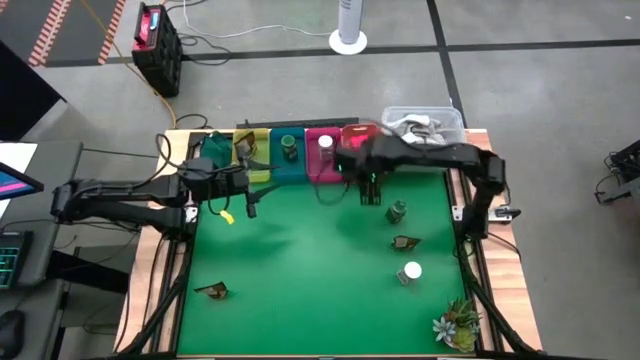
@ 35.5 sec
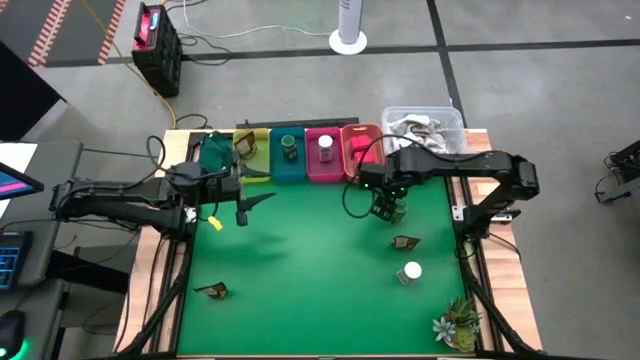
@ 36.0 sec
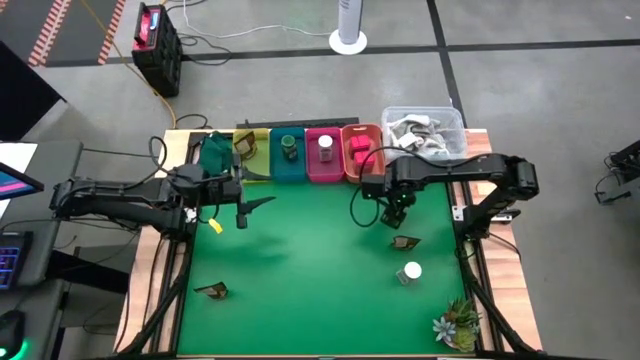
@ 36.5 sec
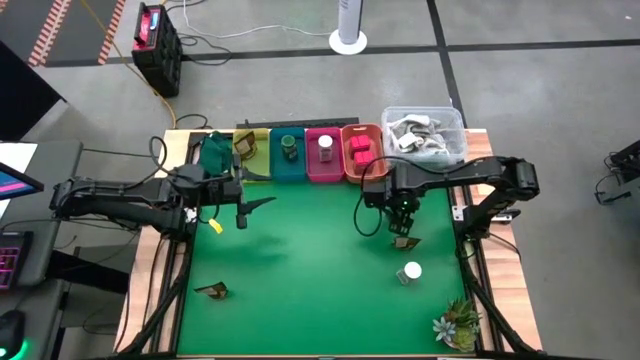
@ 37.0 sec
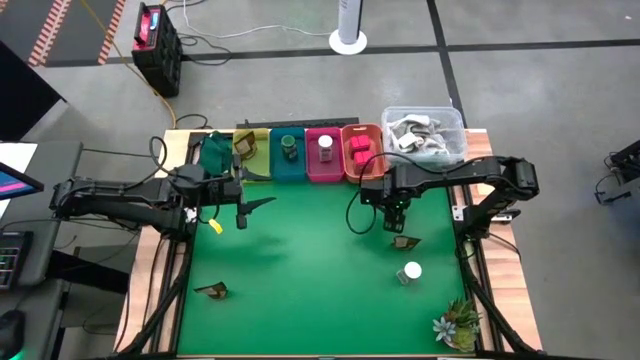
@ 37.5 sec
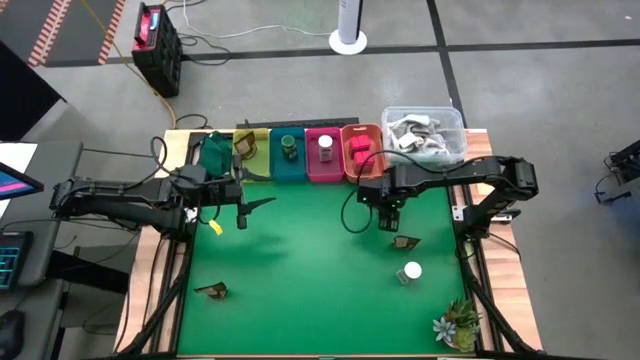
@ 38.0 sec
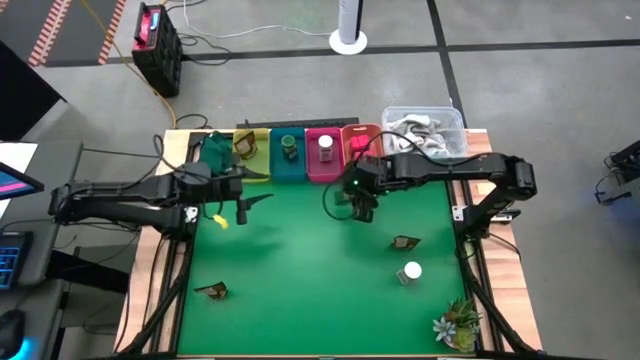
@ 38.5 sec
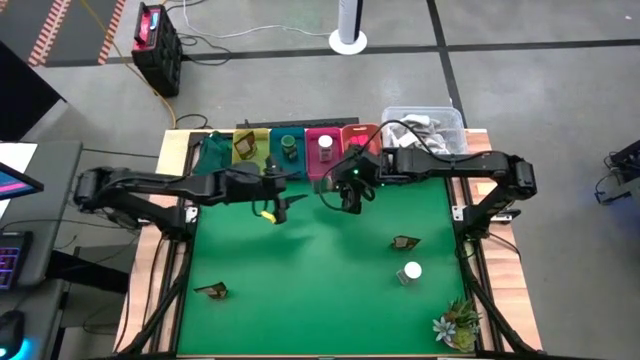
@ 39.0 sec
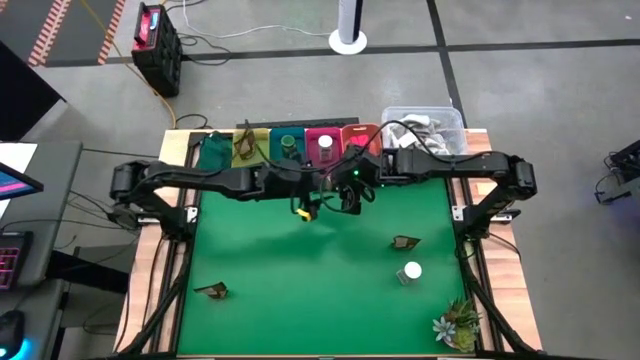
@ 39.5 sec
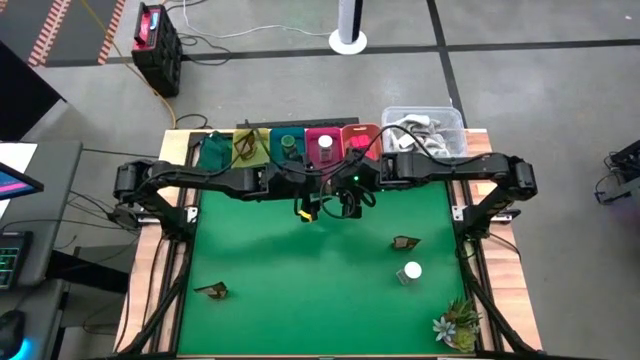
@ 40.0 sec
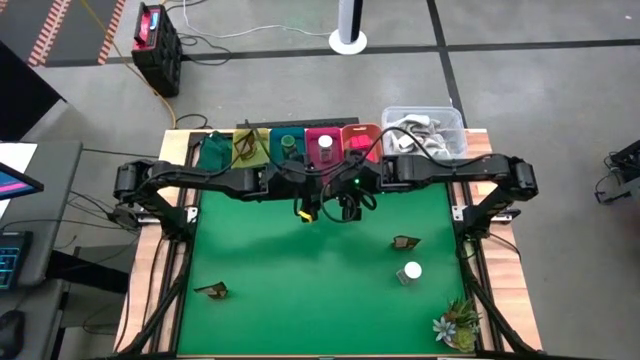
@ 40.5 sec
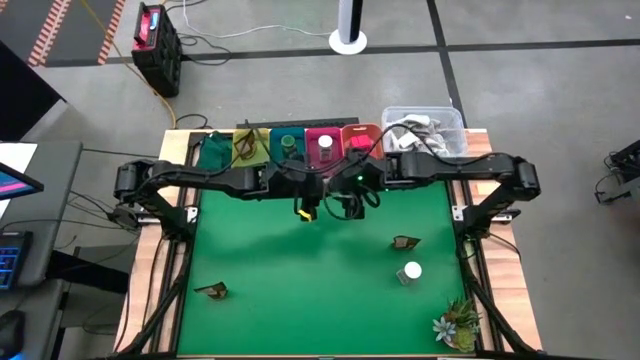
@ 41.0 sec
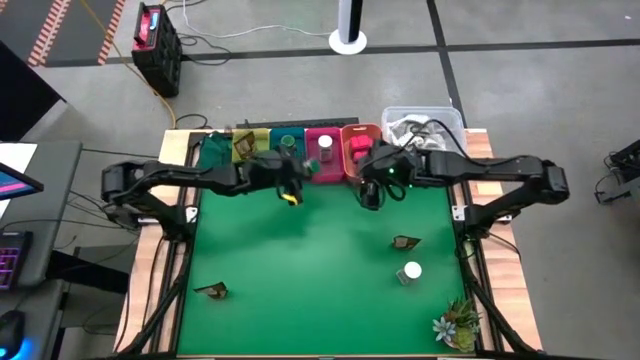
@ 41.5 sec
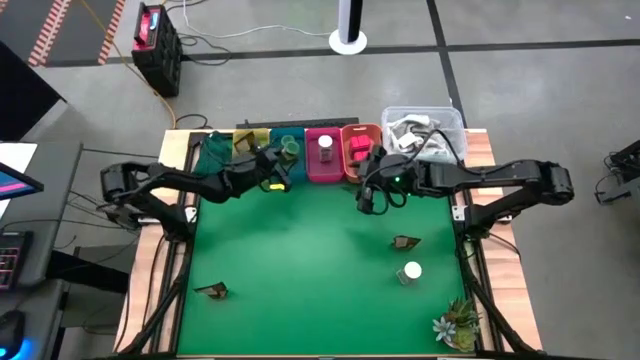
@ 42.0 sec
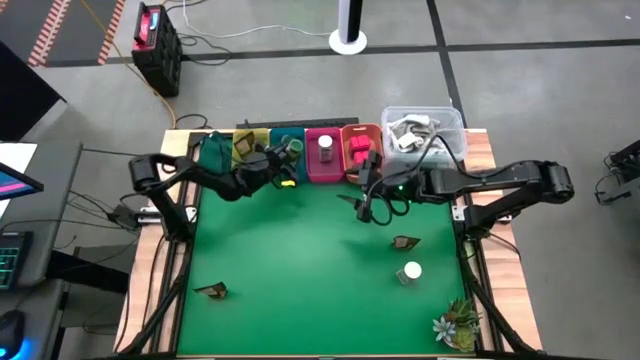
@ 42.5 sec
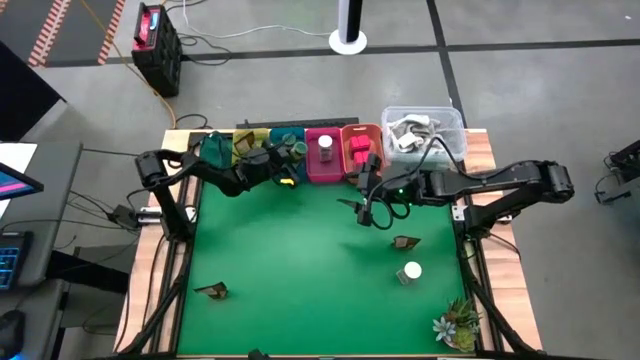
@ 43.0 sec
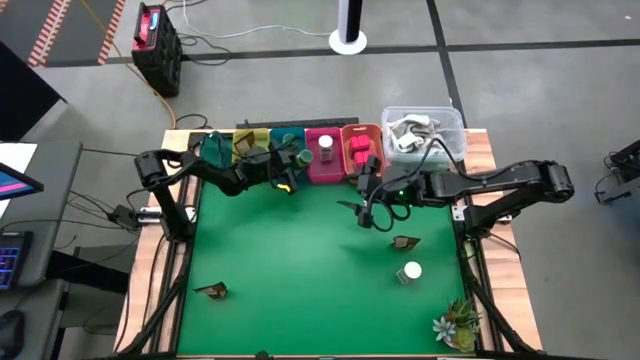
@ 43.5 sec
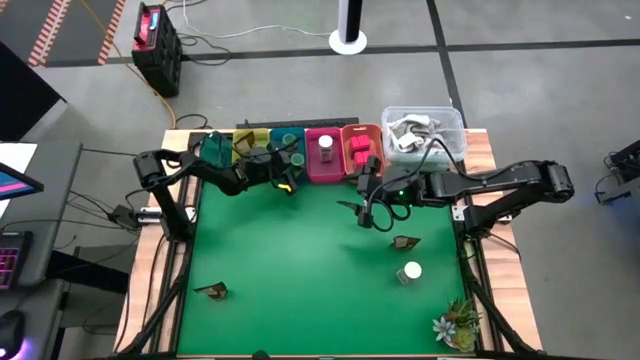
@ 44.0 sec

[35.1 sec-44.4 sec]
Task: Sort spices by type
Put the green spice bottle into the blue bin

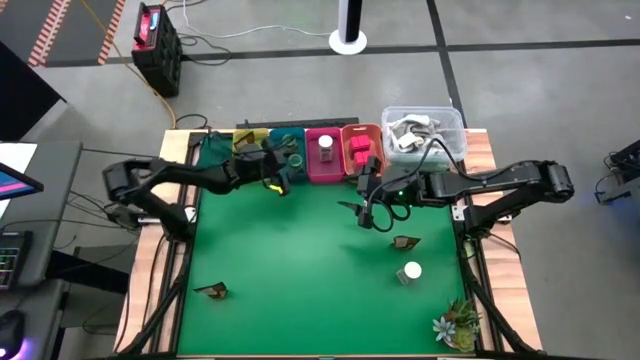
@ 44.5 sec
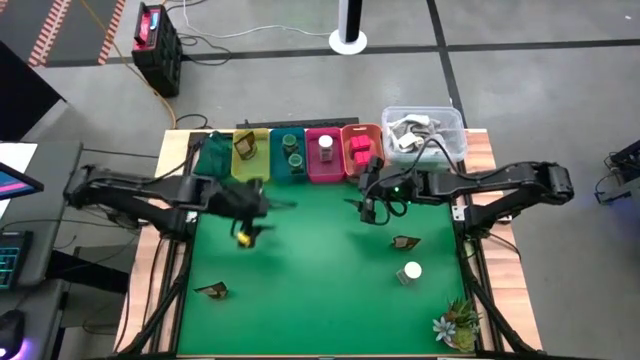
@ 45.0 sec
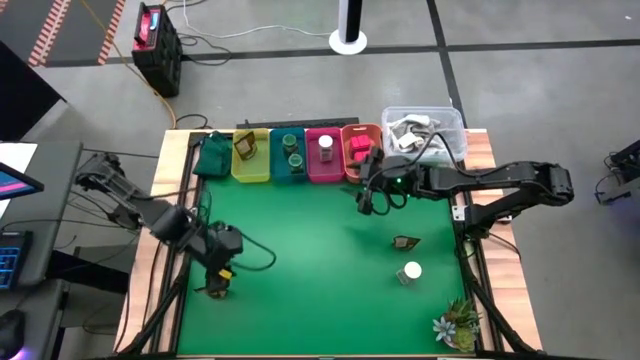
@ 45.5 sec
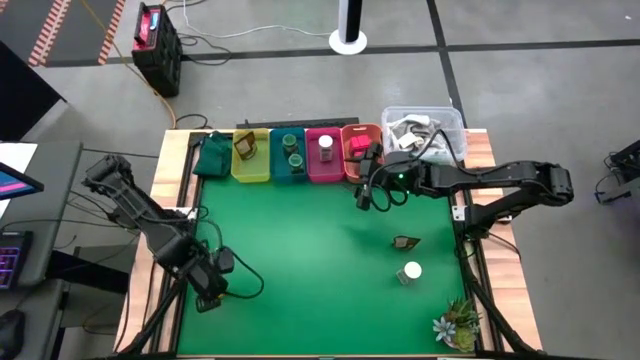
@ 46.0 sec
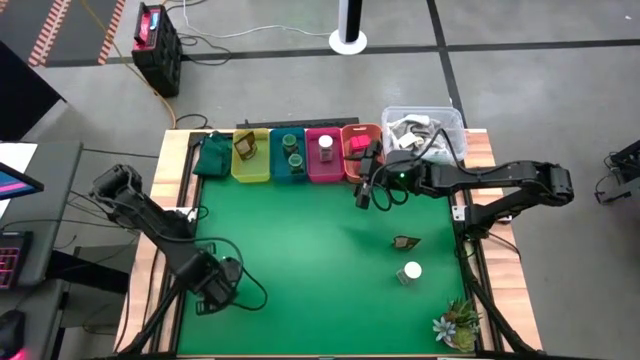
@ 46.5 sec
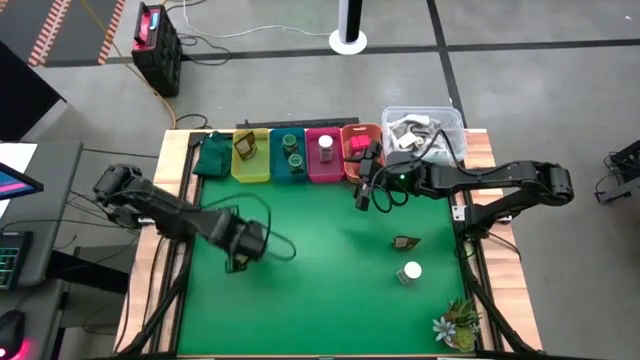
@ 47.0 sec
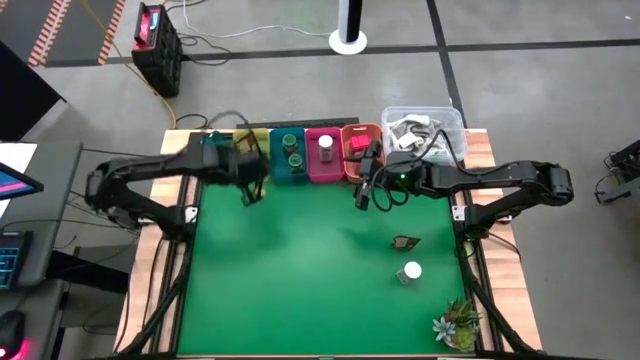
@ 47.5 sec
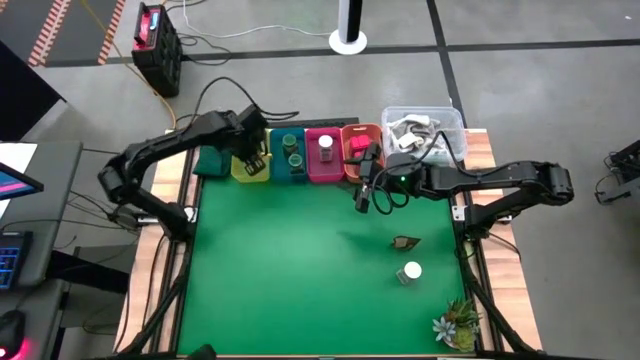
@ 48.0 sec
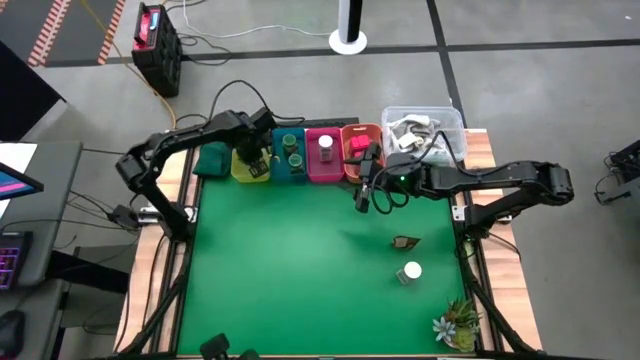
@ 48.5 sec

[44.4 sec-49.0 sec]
Put the left orange spice pack into the yellow bin

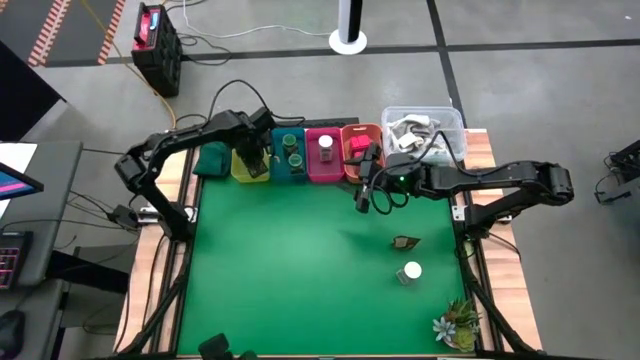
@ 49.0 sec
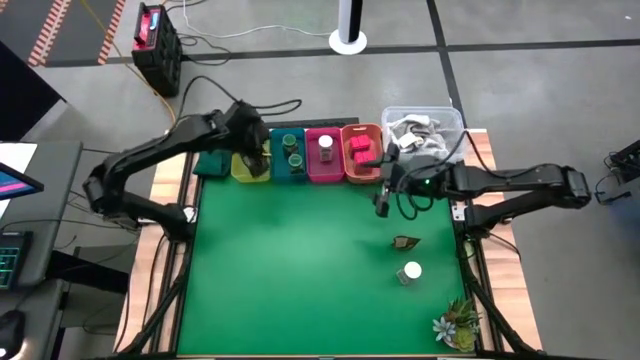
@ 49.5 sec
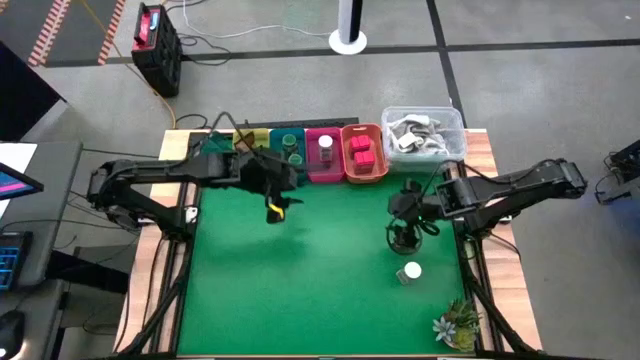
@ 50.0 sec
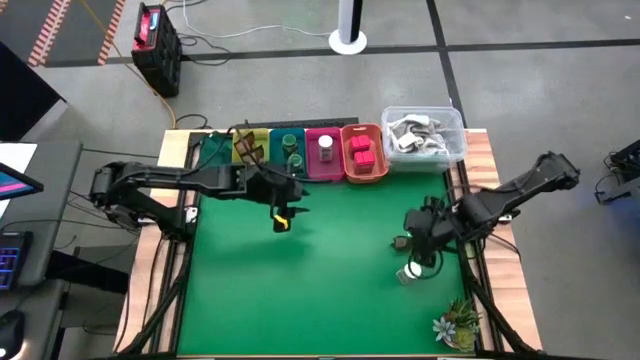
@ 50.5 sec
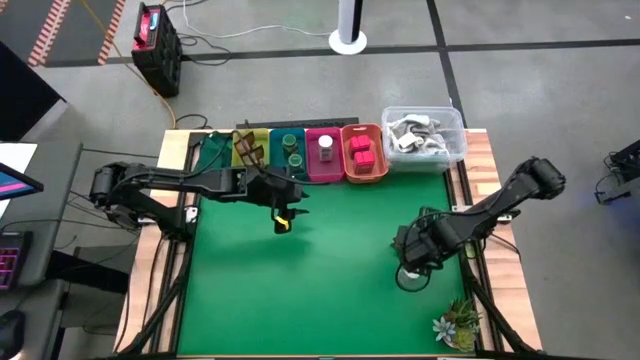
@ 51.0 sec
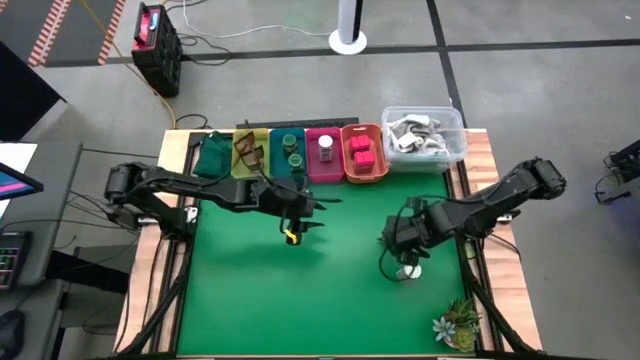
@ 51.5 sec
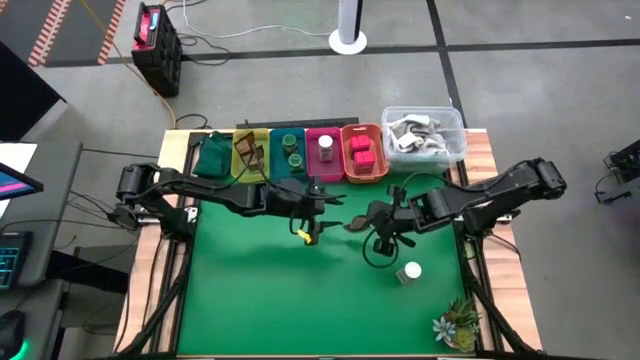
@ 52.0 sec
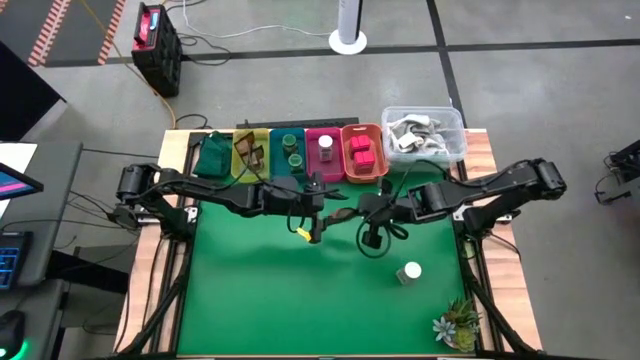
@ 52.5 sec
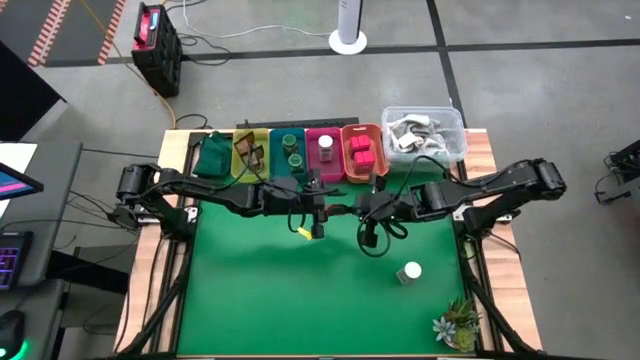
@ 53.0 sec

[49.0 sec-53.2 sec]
Put the orange spice pack into the yellow bin
